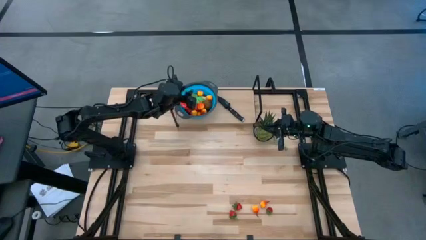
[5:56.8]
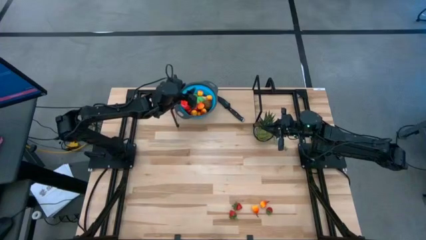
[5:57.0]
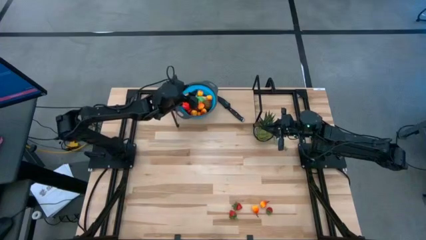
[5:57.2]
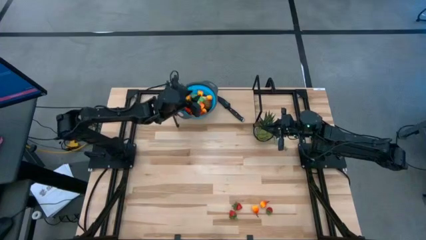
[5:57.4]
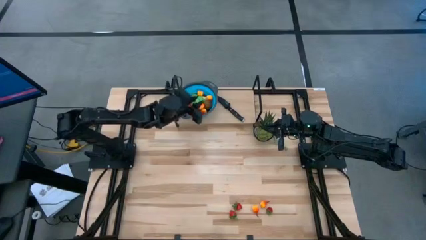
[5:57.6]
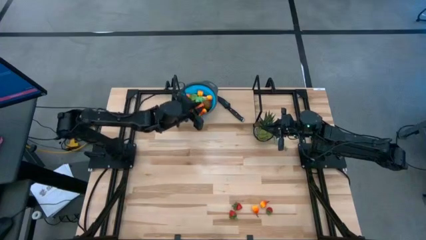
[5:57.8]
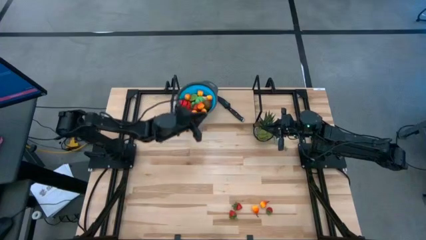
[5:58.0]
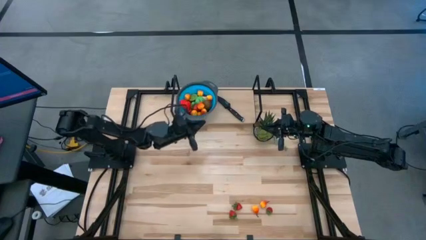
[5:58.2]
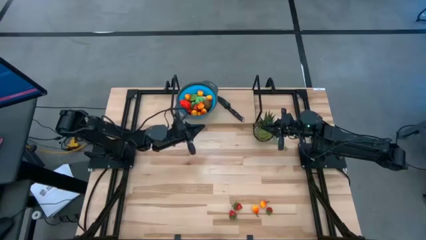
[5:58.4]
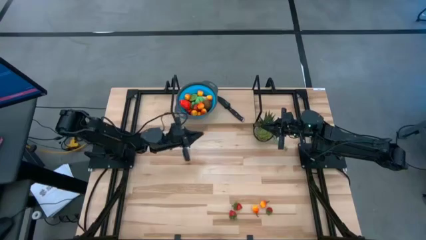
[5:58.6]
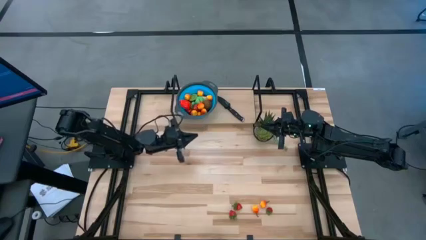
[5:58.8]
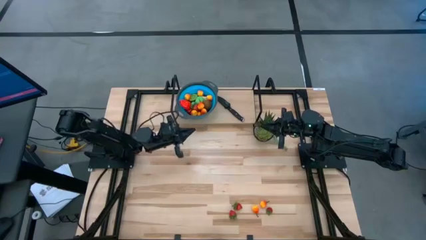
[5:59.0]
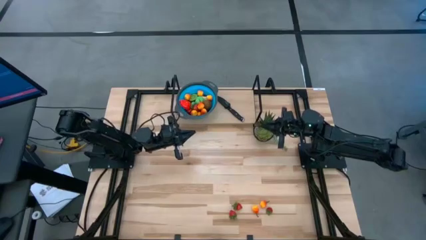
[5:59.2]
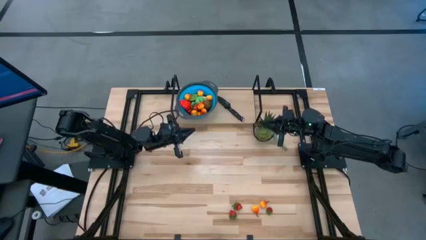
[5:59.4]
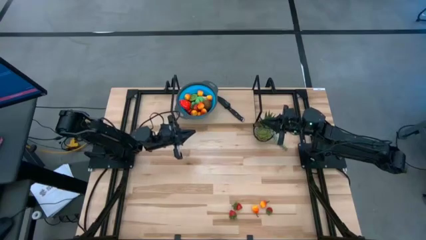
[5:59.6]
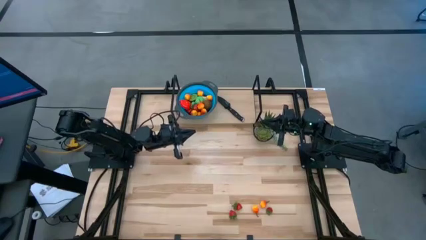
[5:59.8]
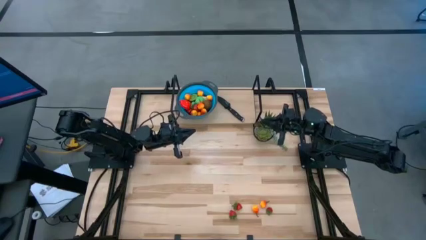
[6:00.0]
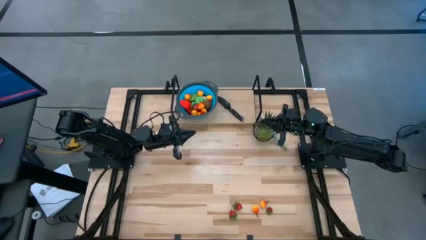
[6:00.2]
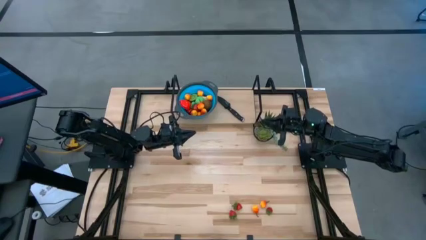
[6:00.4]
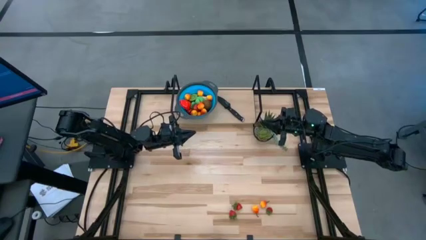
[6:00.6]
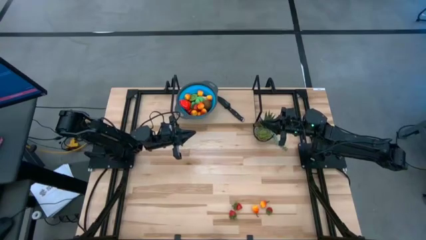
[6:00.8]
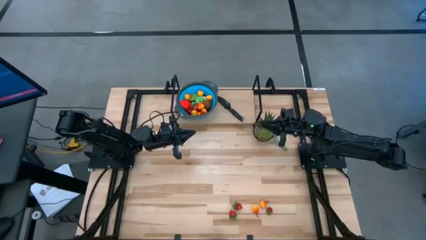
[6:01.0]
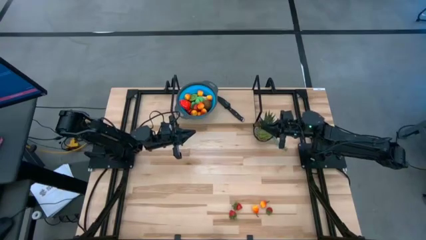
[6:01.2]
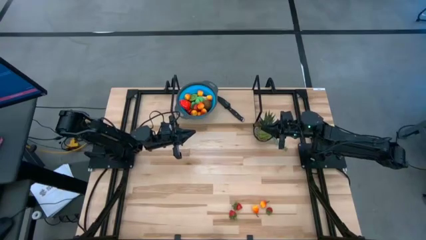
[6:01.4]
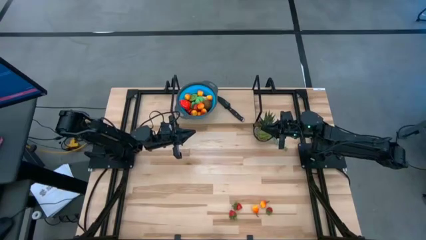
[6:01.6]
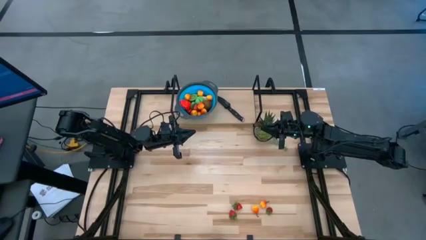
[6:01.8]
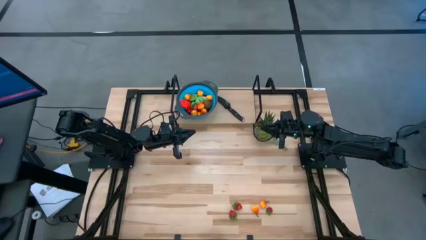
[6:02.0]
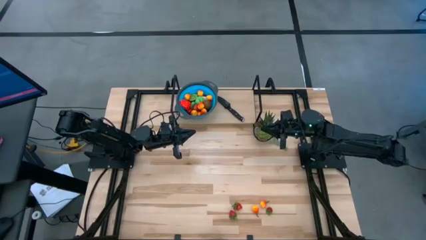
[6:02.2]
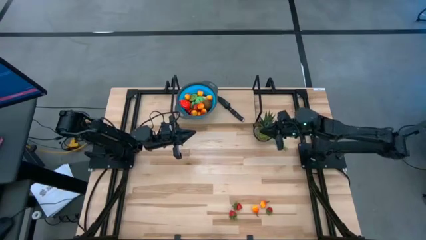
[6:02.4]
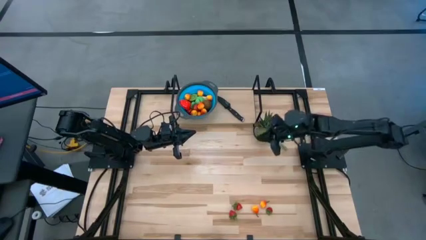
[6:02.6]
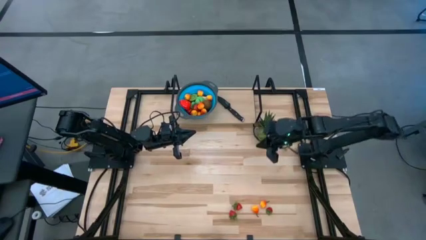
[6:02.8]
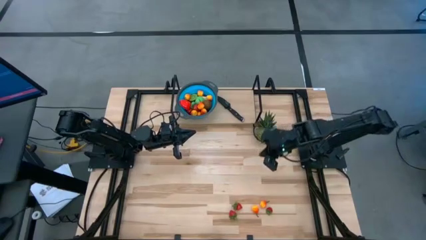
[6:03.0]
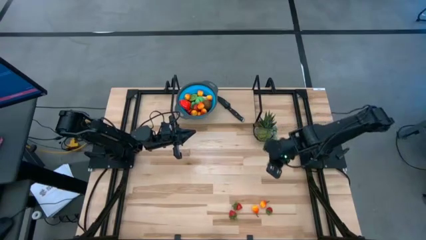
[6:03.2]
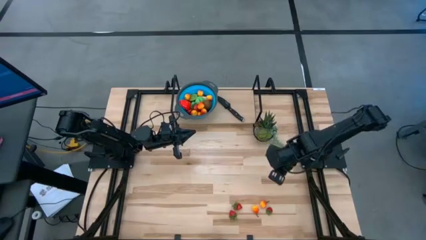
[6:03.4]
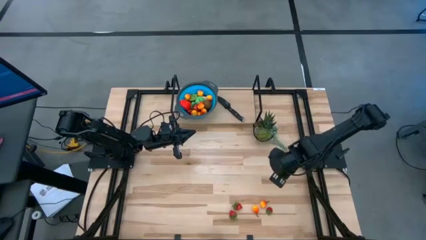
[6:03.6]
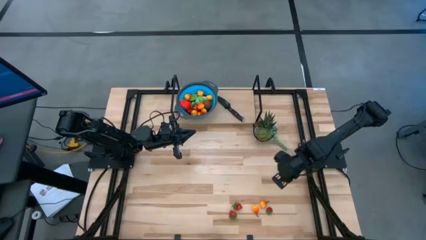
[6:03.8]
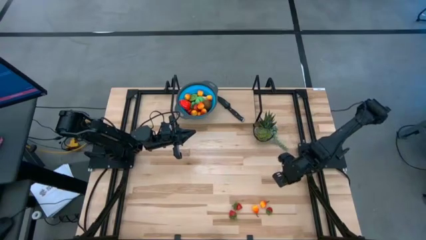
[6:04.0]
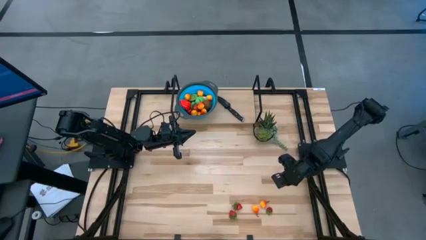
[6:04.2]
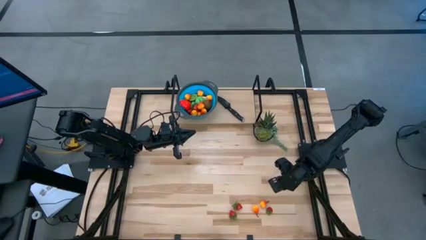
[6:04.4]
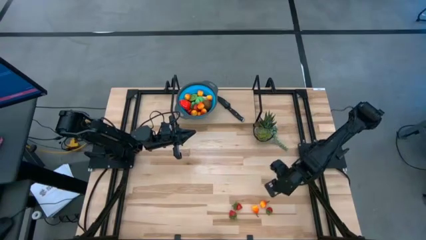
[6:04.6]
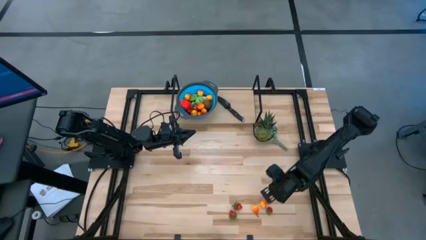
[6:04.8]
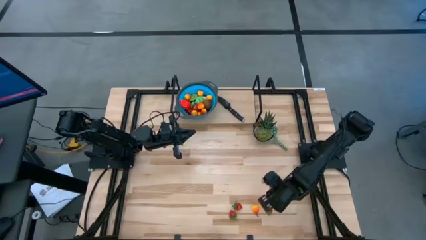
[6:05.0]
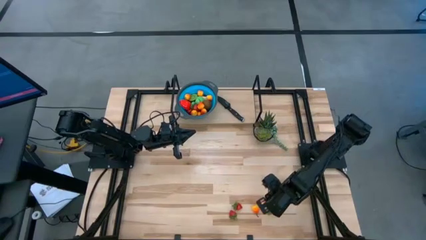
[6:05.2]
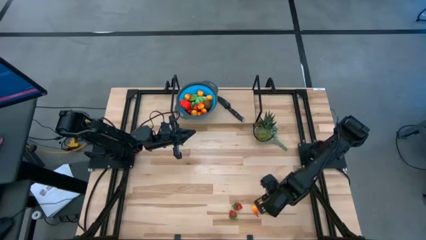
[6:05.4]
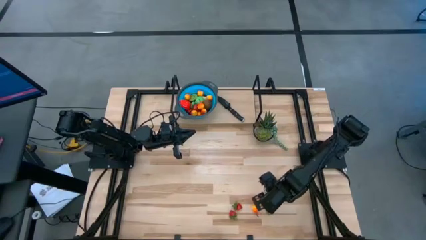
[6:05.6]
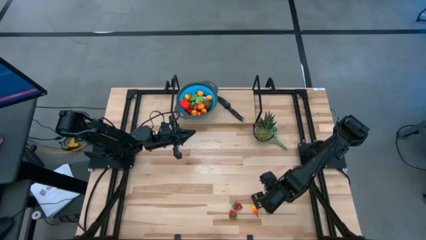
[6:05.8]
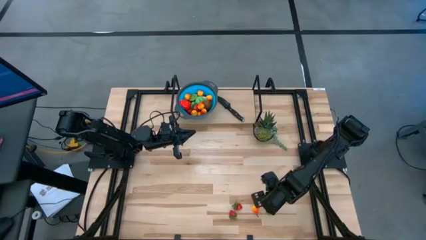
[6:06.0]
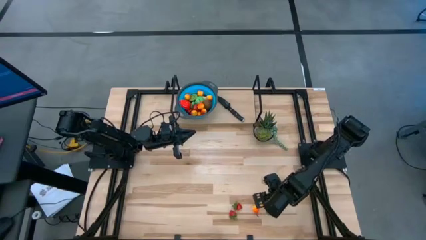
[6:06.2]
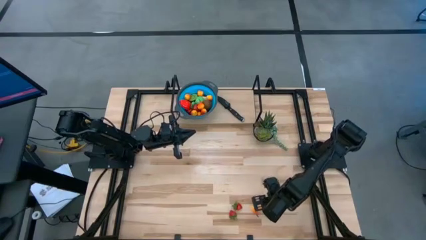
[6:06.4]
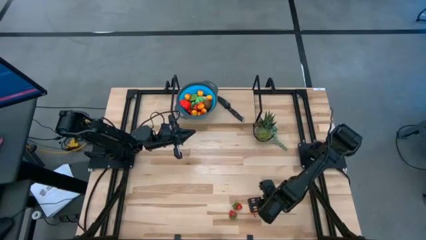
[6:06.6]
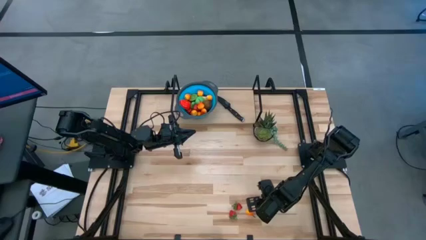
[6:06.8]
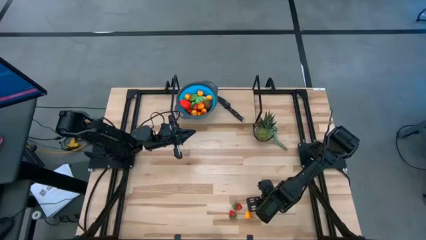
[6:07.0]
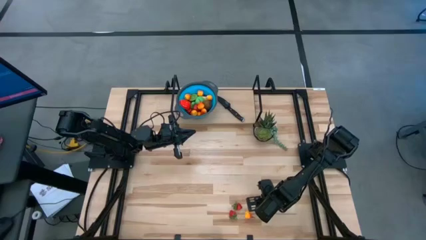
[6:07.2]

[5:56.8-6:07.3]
Task: Pick & Place Fruit
Put the pear into the basket

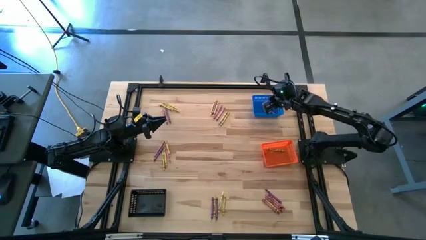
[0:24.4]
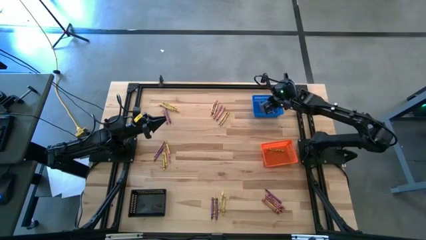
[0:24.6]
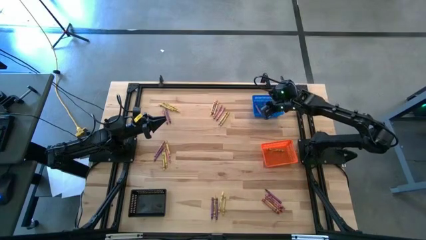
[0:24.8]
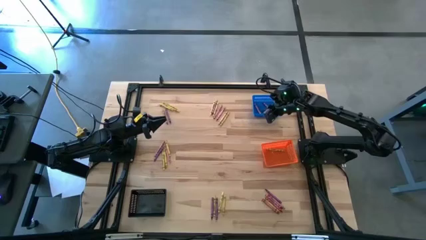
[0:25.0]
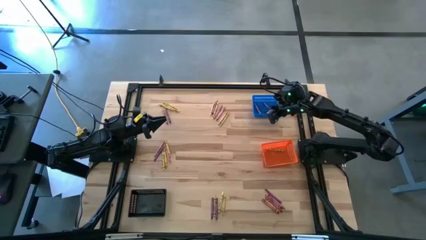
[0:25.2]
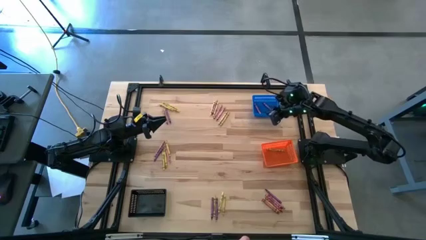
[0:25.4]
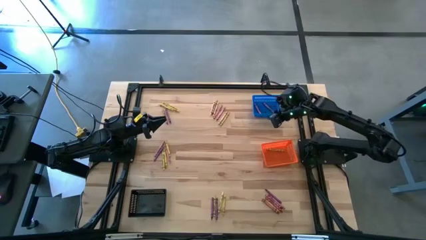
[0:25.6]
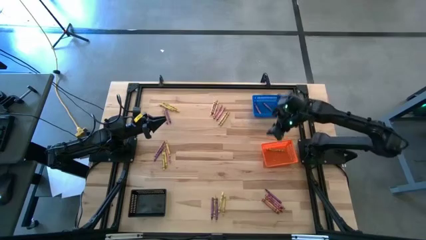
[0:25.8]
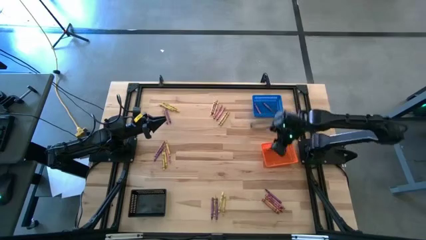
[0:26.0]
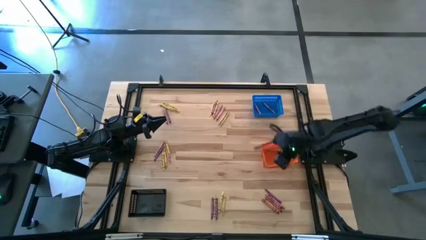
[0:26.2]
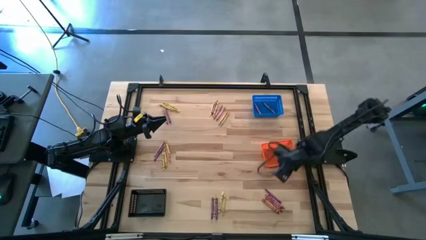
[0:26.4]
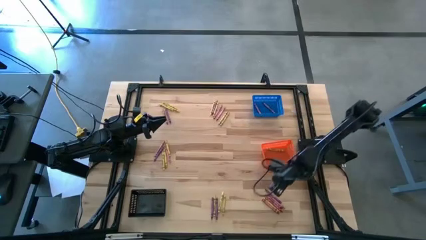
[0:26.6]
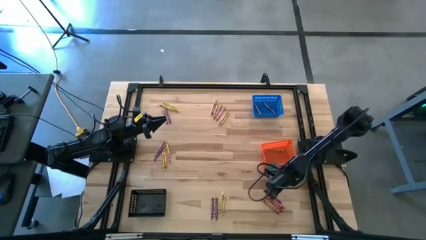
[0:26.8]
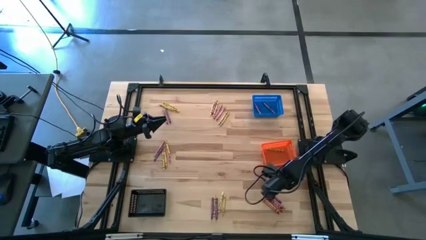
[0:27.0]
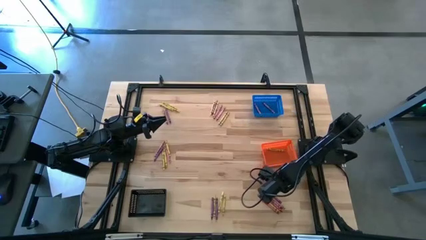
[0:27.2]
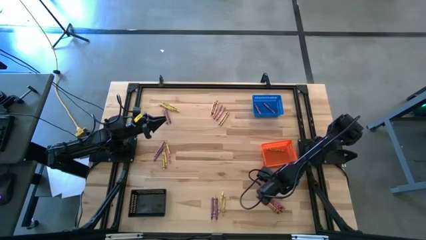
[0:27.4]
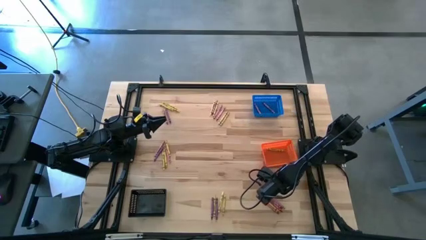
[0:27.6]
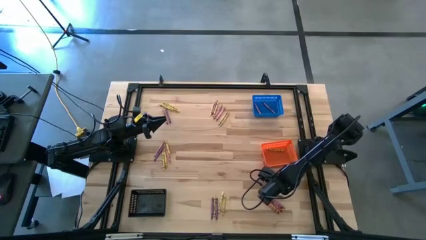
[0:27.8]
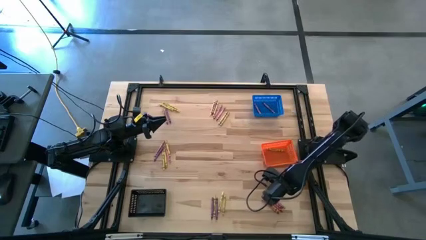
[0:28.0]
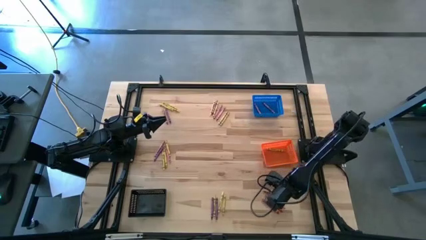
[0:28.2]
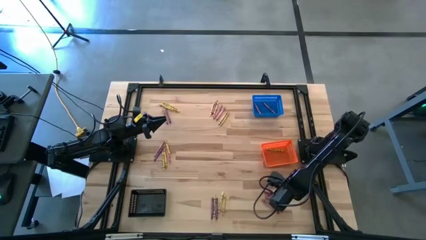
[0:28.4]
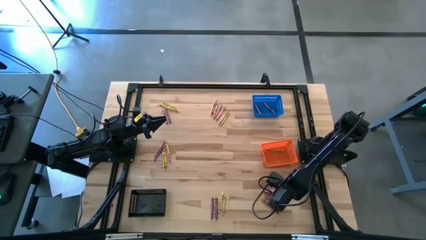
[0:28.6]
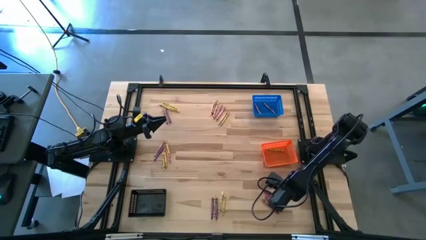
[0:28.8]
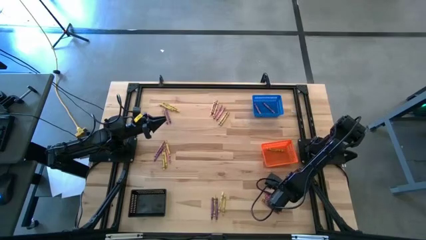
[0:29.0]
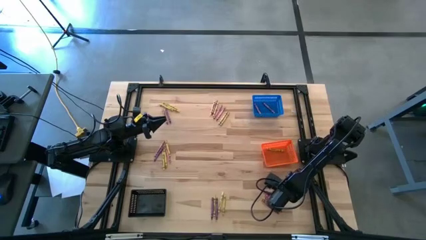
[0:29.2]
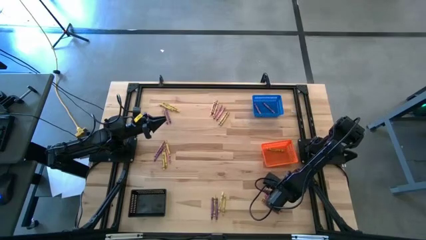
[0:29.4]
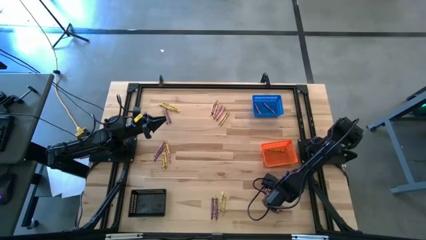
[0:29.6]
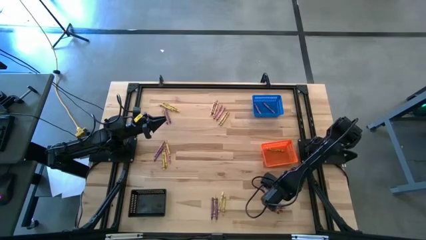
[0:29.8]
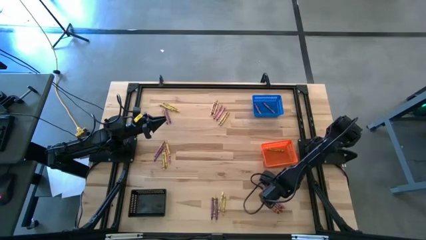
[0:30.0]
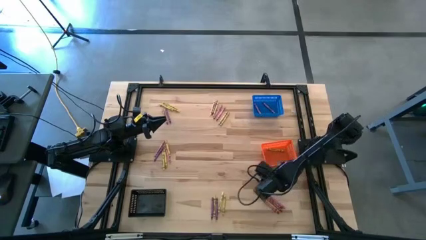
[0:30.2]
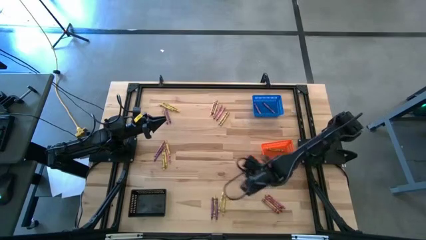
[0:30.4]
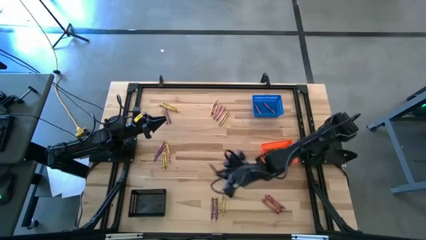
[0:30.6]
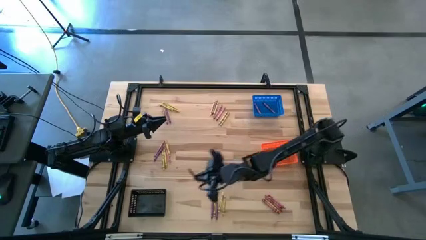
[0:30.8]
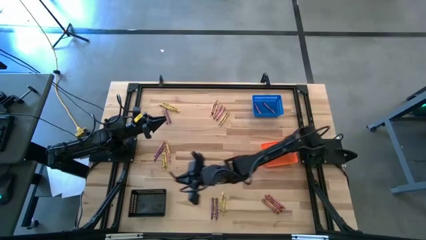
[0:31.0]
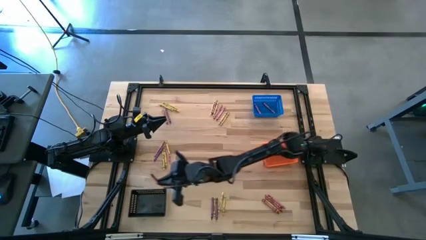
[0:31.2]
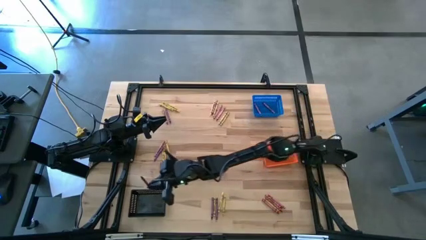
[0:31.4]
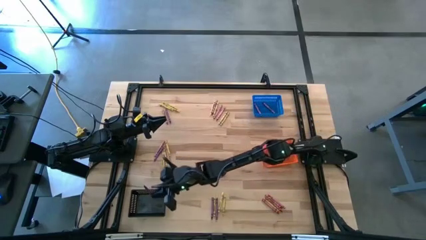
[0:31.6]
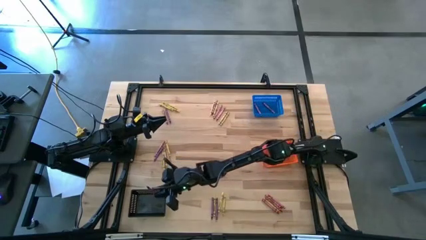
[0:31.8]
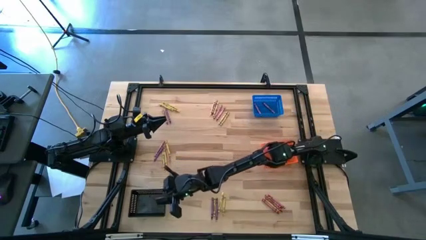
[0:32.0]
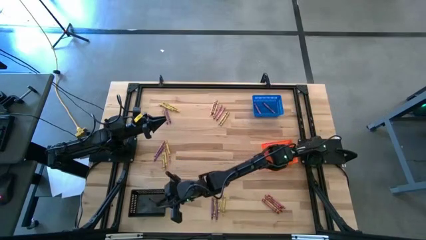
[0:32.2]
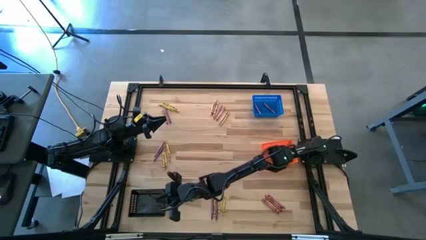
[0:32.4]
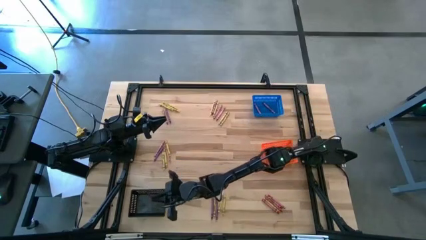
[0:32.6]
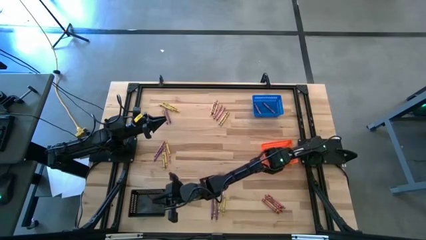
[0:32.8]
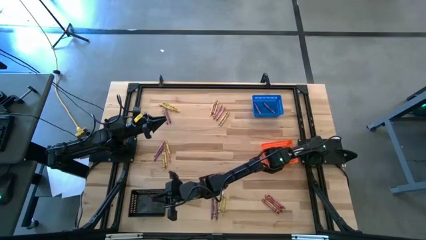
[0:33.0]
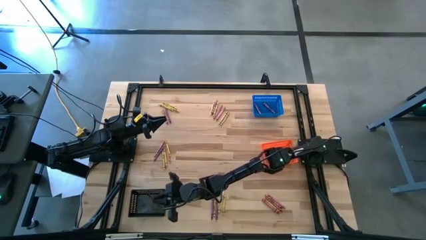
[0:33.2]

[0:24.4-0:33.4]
Task: Sort crayons
Put the violet crayon into the black basket
